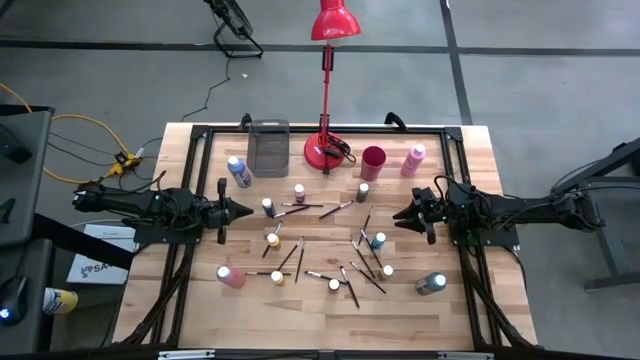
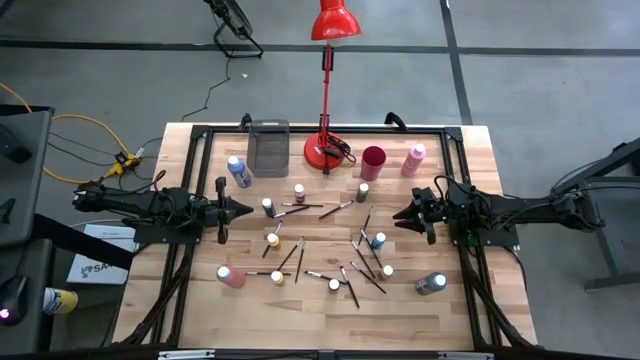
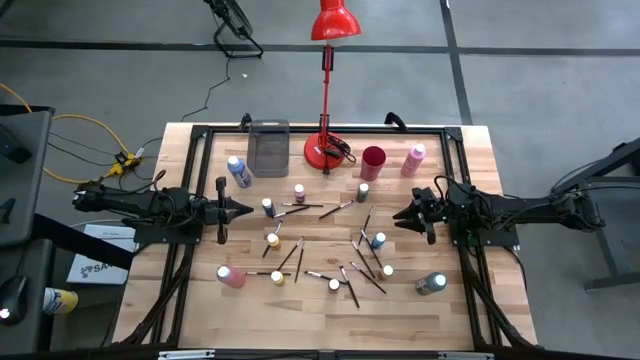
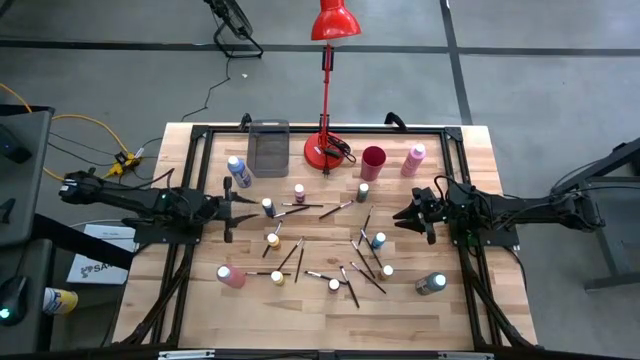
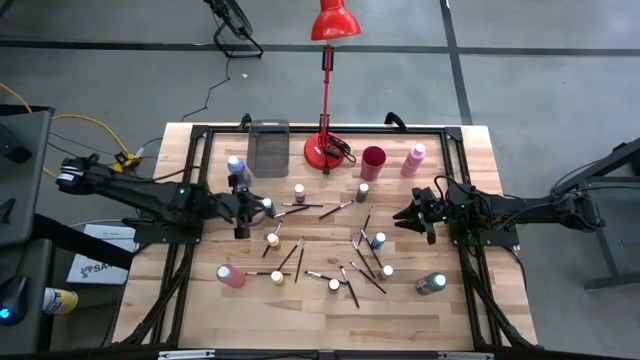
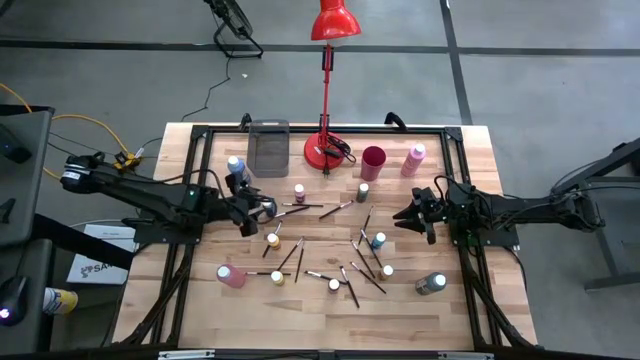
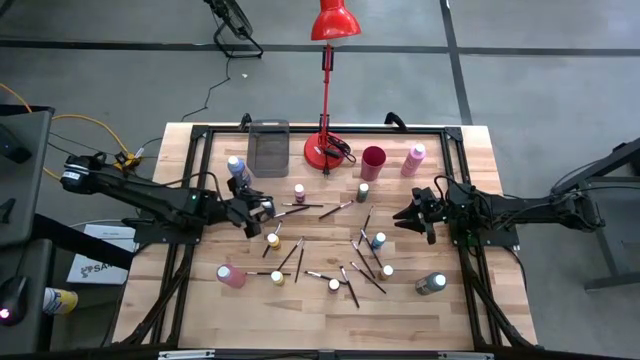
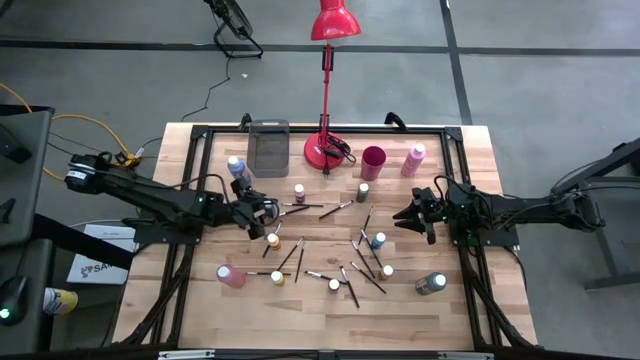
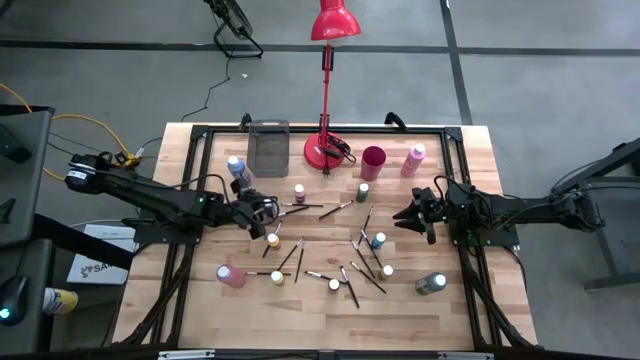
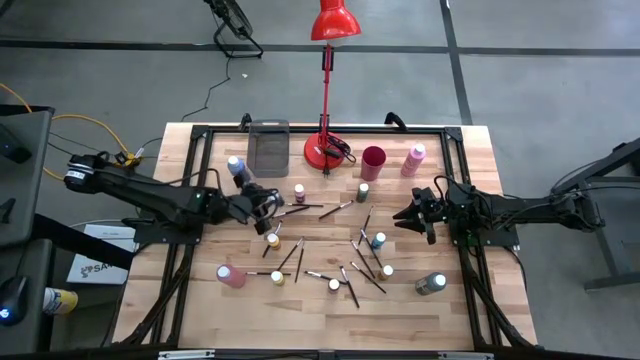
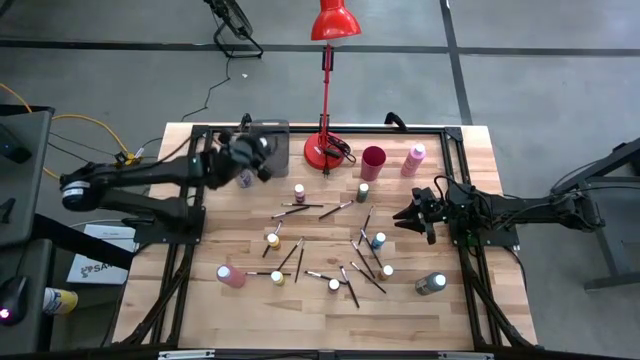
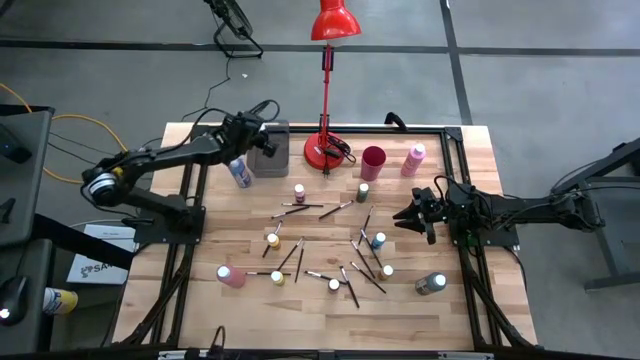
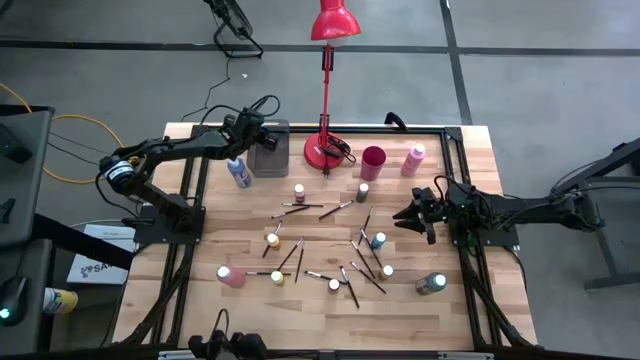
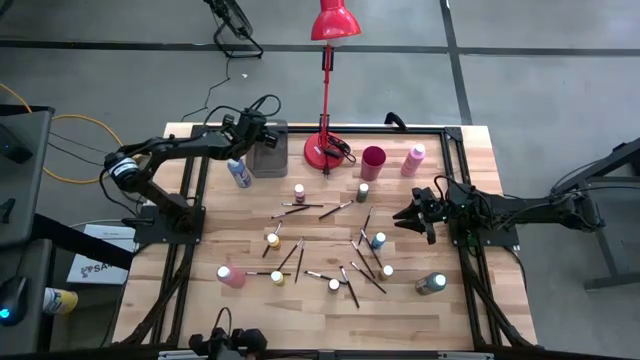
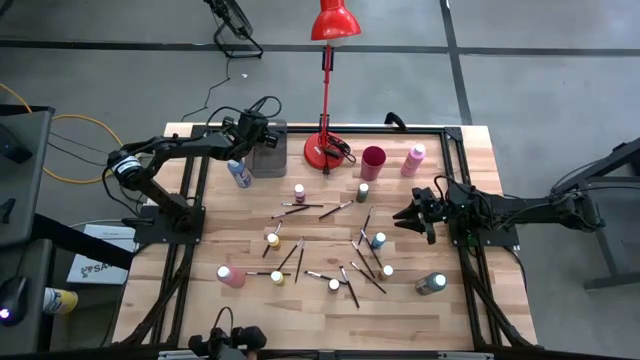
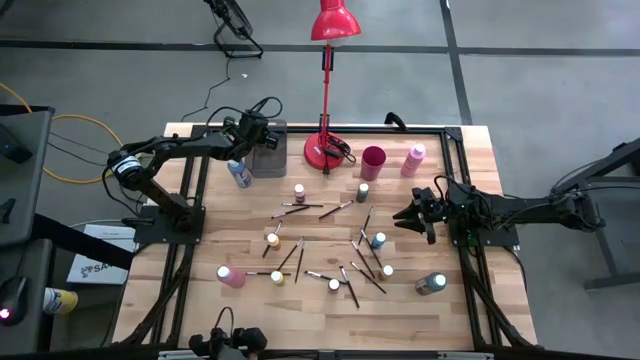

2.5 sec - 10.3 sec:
Task: Pick & Place Paint Supplies
Put the small blue black paint bottle into the bin

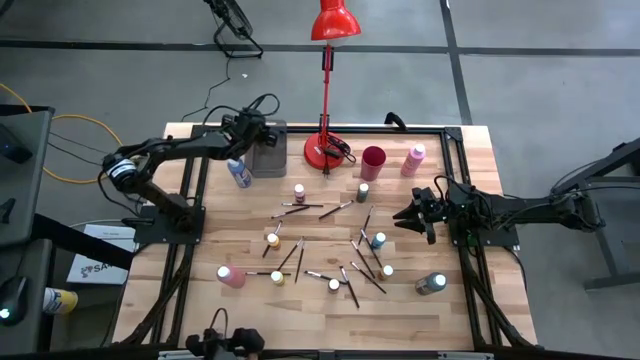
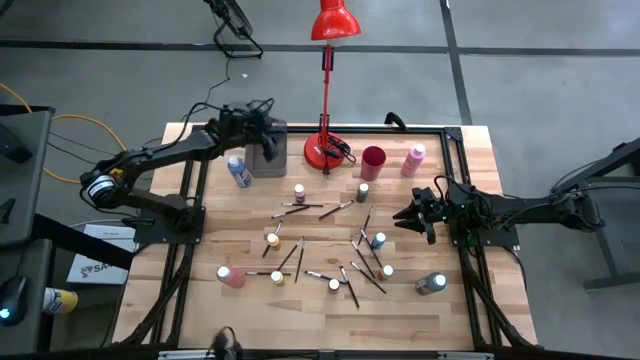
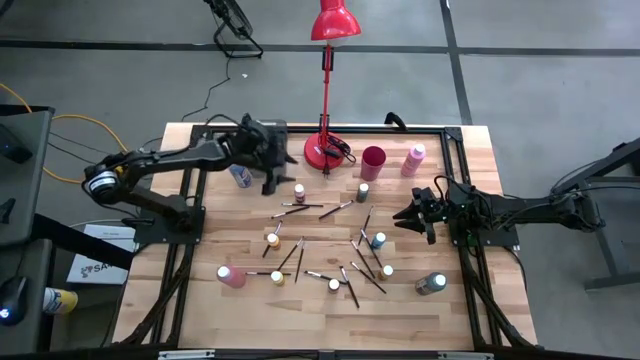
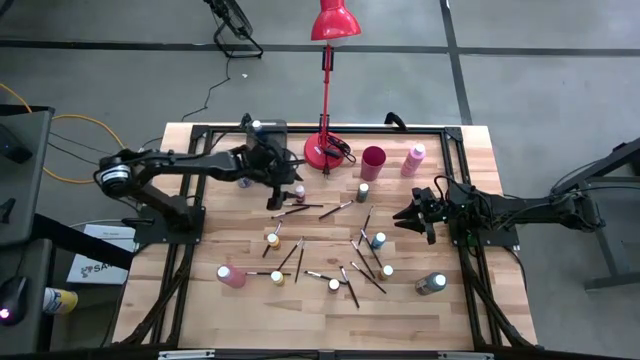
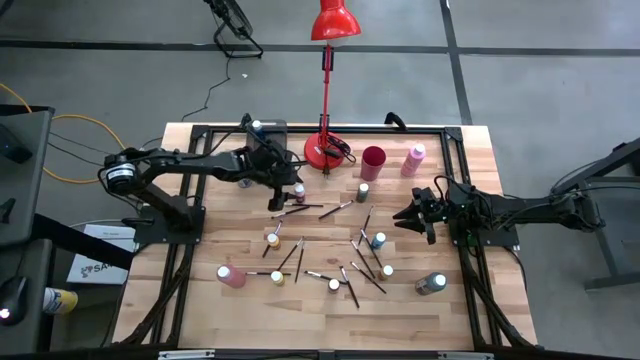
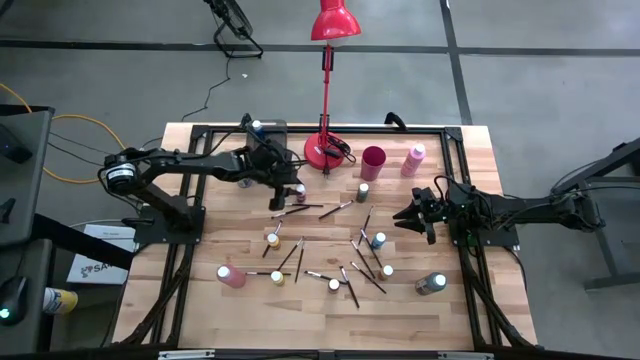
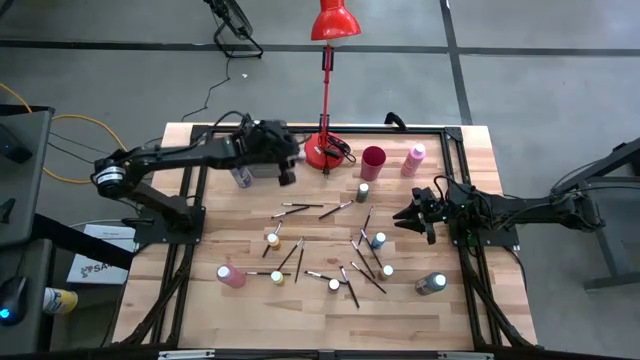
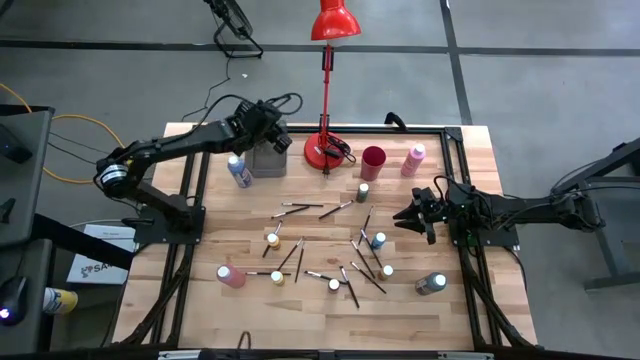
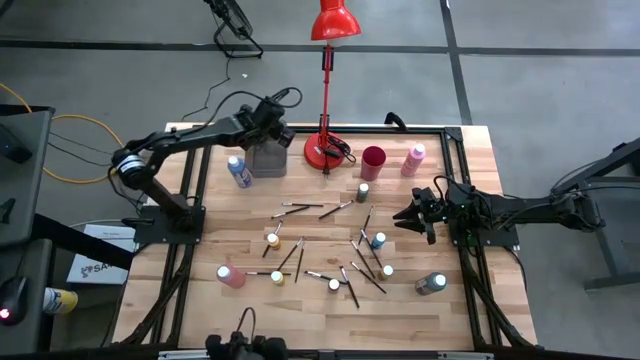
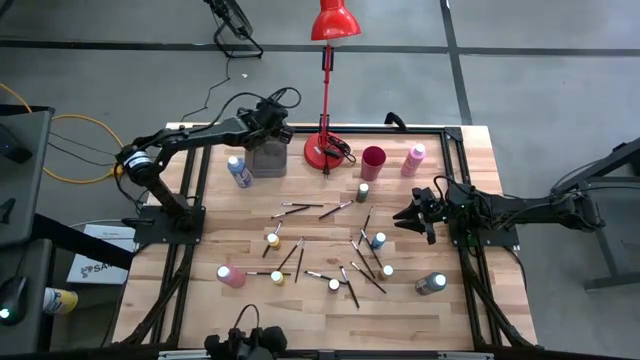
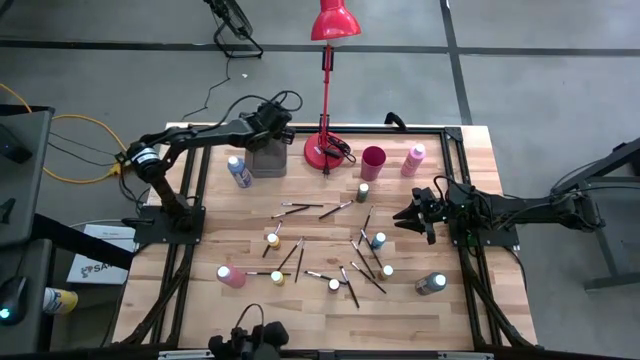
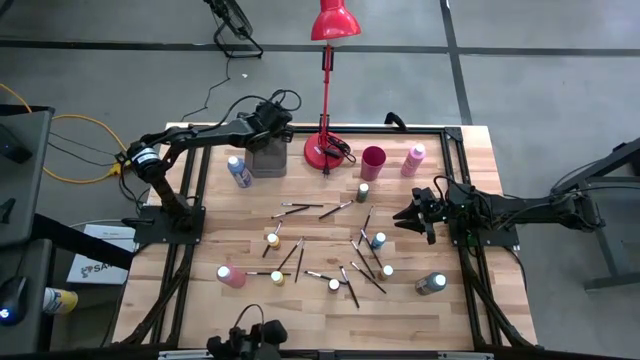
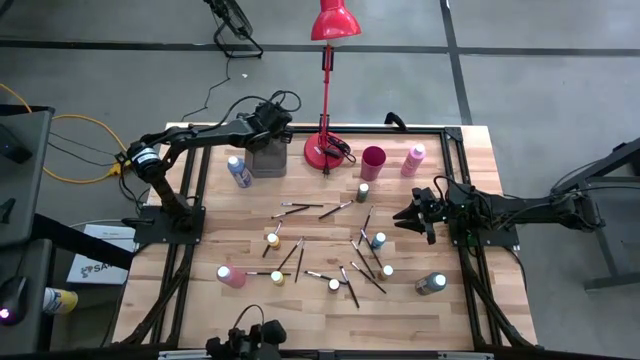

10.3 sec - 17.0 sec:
Put the small pink black paint bottle into the bin

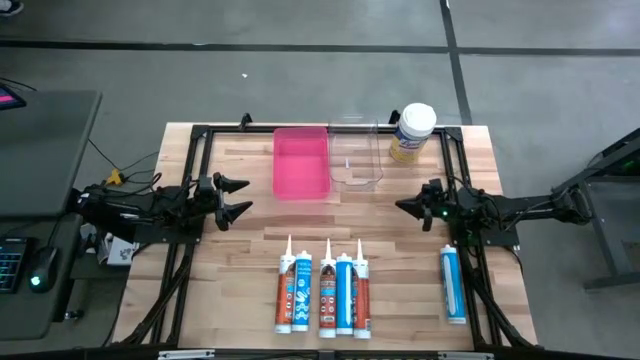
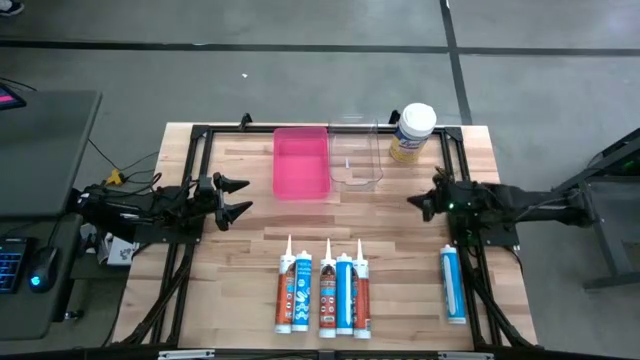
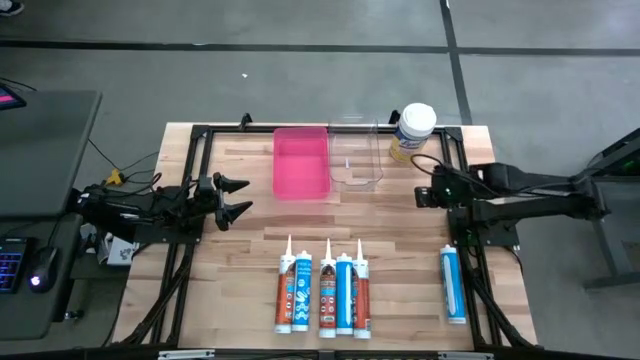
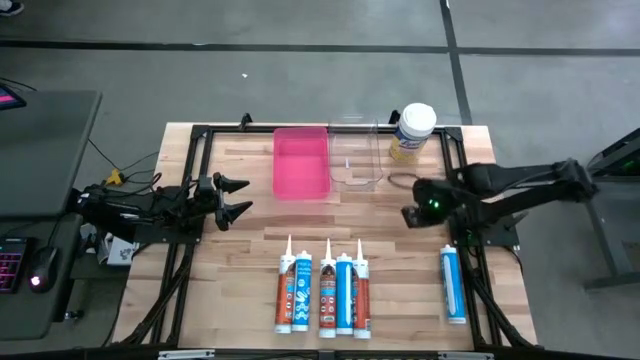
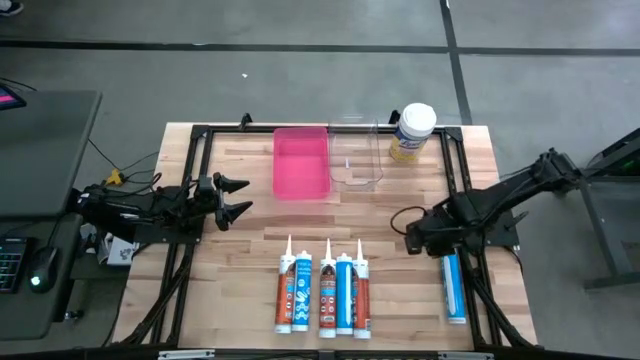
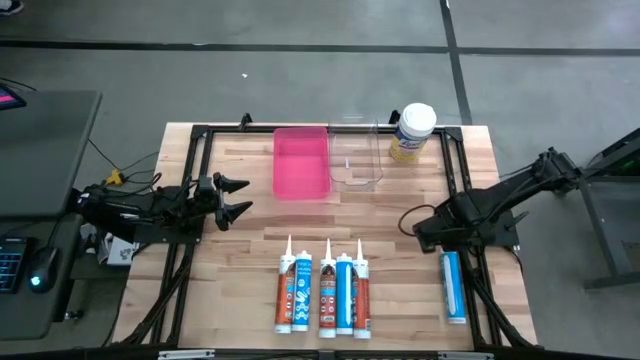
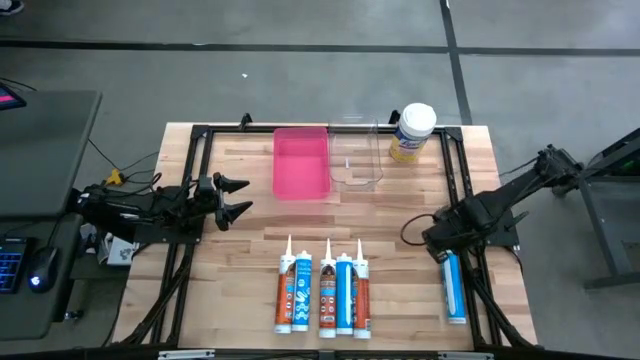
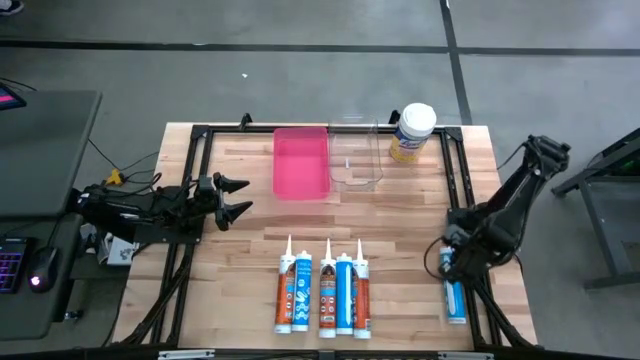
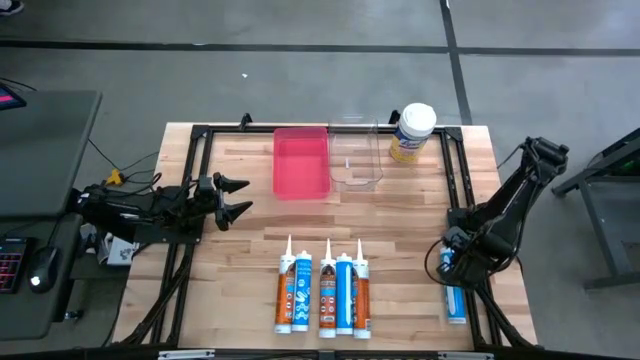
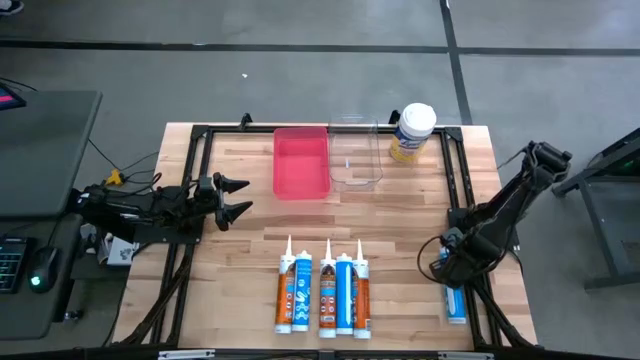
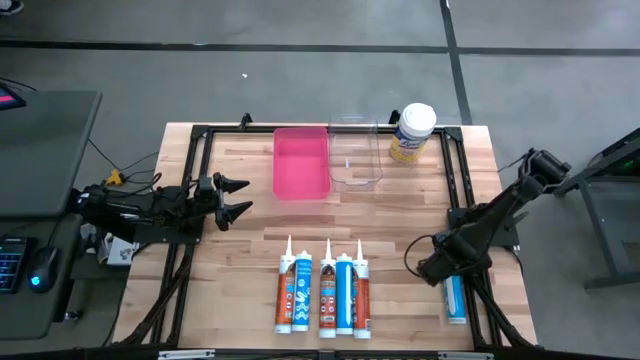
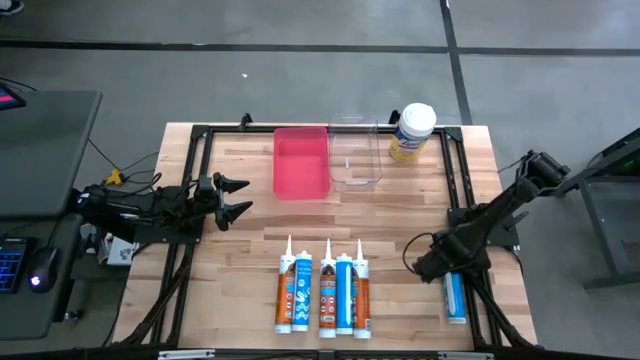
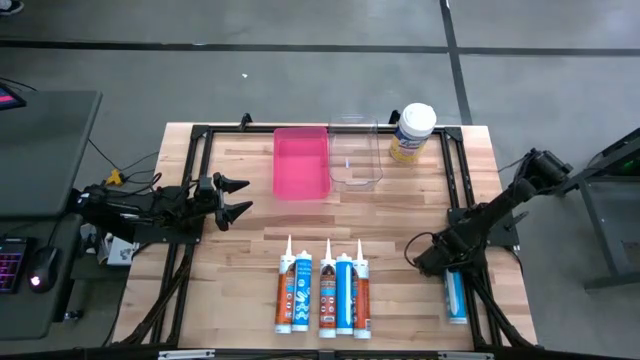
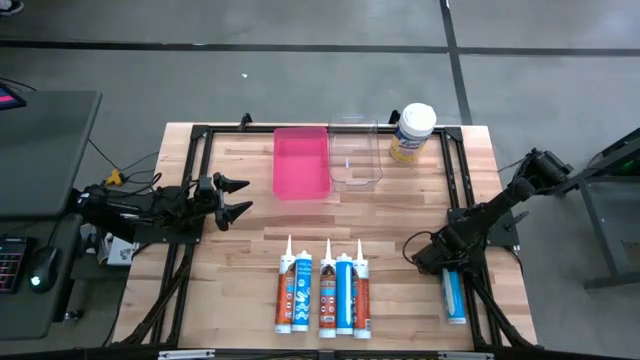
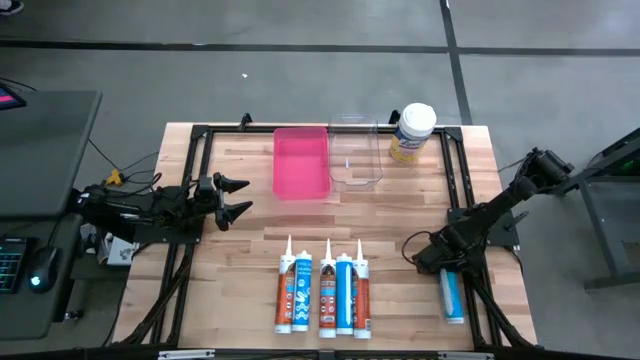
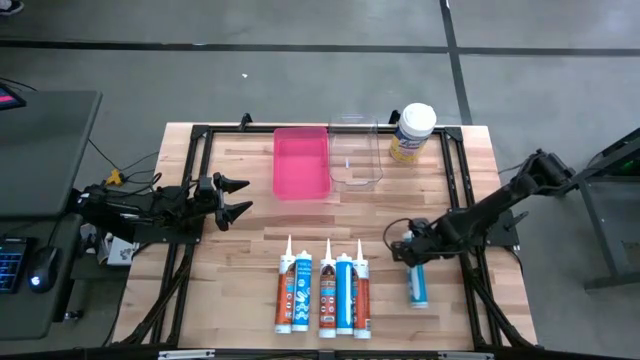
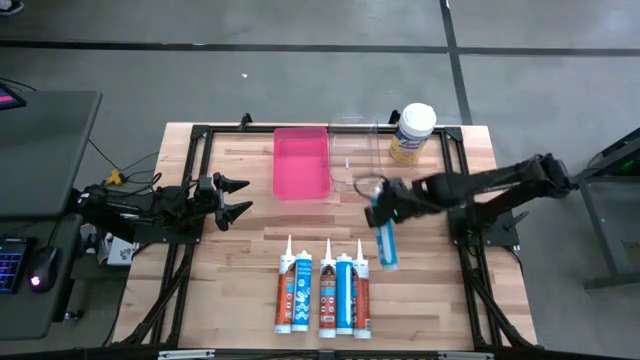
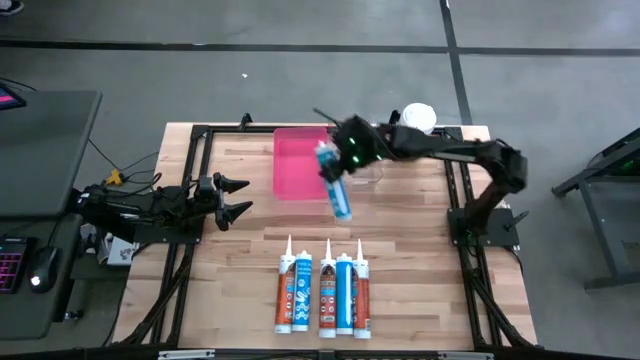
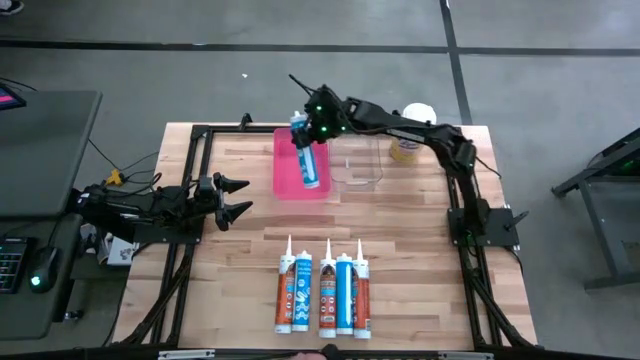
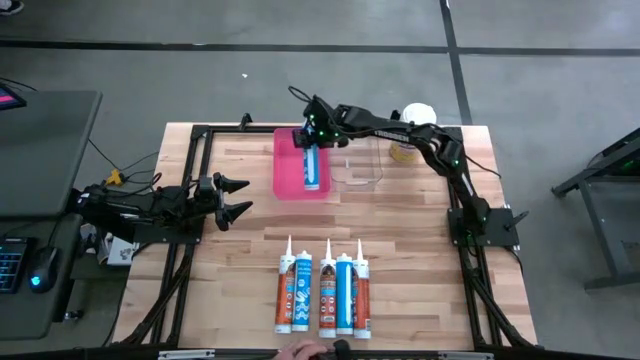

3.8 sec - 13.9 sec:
Task: Pick & place silicon tubes, Sealant and Lysol wipes
Put the right blue sealant into the red bin
